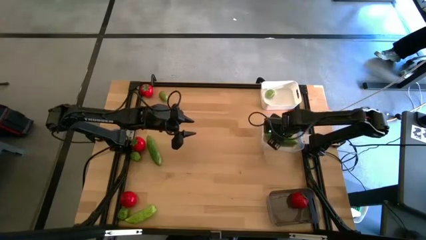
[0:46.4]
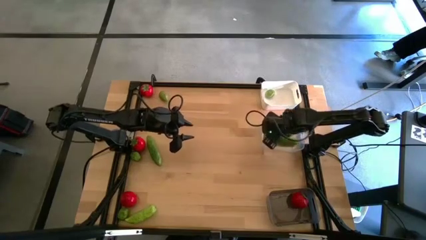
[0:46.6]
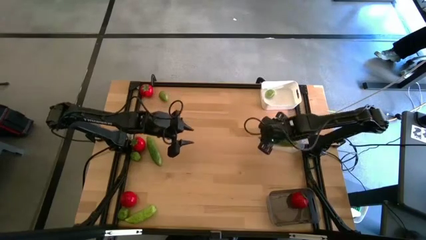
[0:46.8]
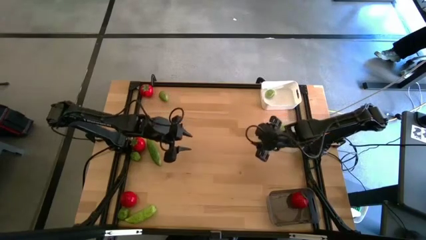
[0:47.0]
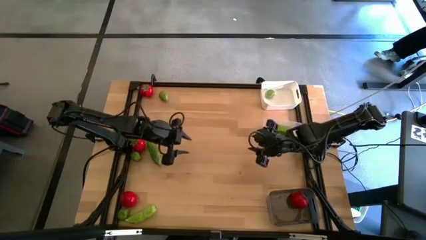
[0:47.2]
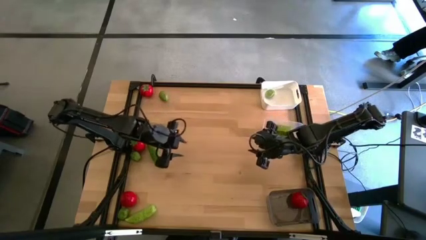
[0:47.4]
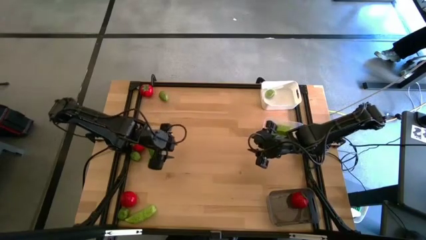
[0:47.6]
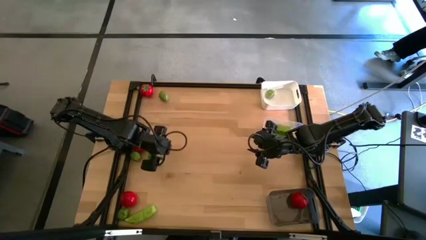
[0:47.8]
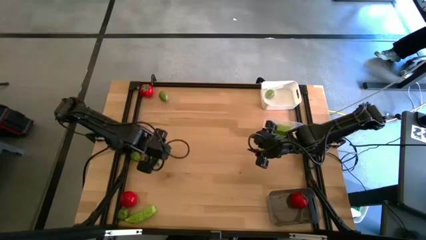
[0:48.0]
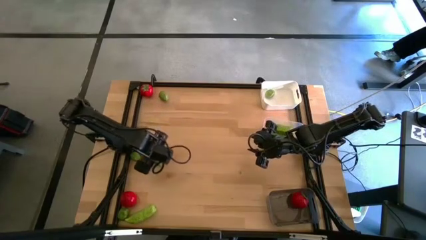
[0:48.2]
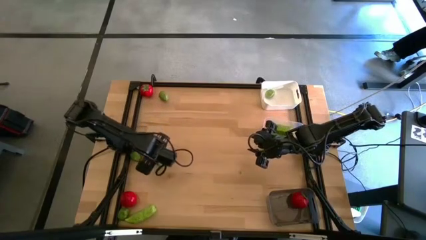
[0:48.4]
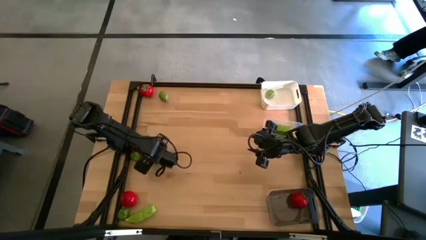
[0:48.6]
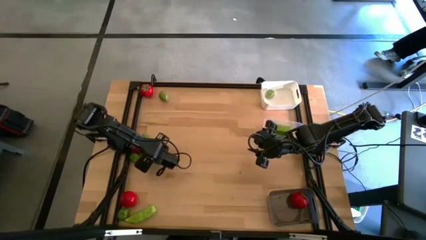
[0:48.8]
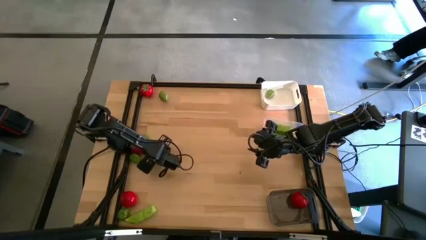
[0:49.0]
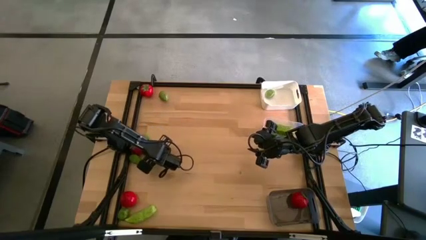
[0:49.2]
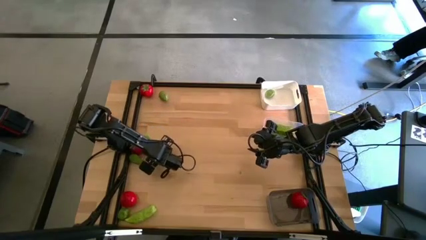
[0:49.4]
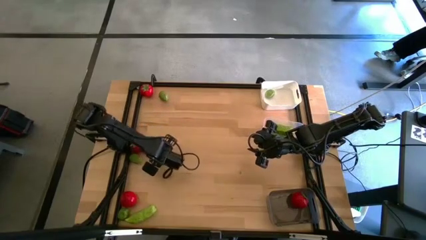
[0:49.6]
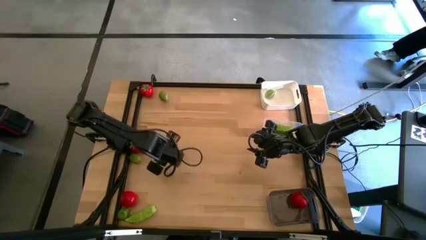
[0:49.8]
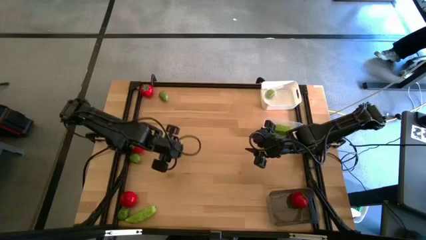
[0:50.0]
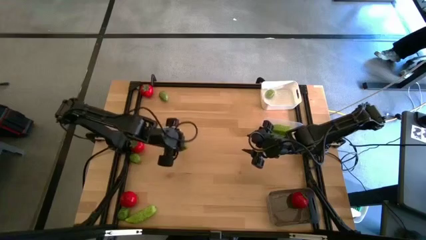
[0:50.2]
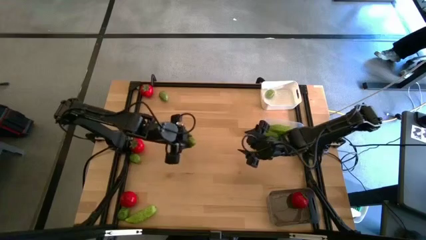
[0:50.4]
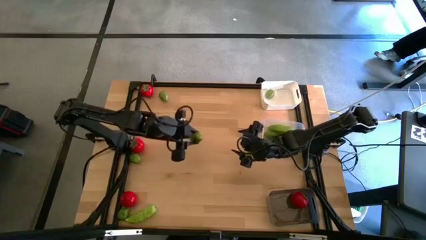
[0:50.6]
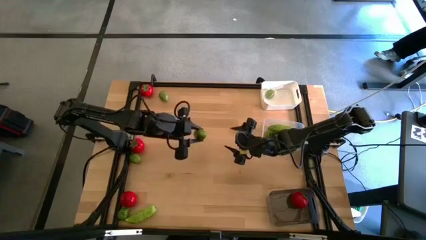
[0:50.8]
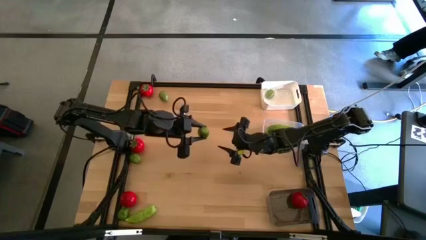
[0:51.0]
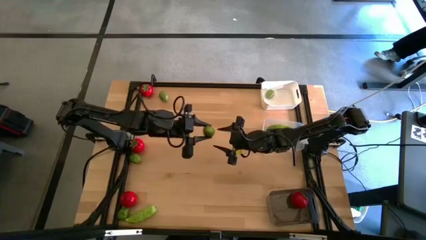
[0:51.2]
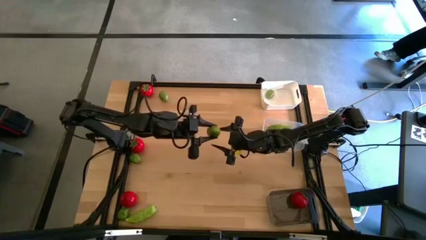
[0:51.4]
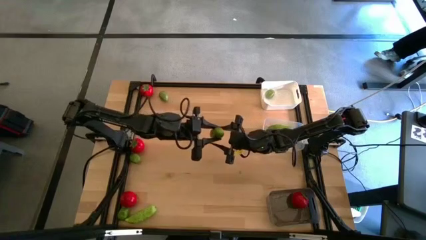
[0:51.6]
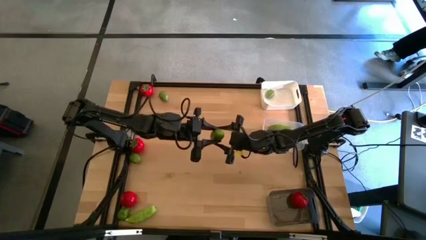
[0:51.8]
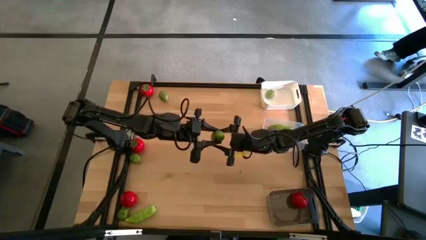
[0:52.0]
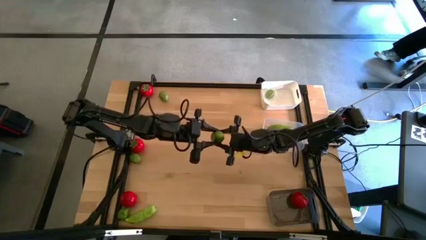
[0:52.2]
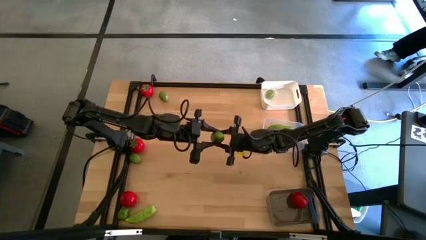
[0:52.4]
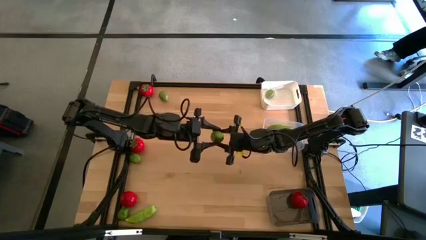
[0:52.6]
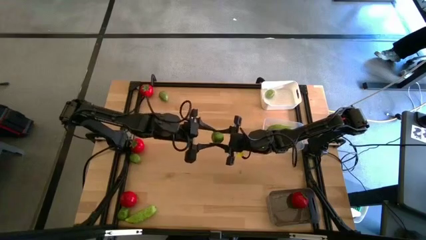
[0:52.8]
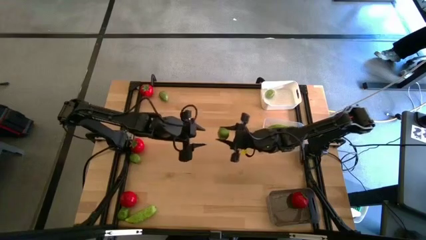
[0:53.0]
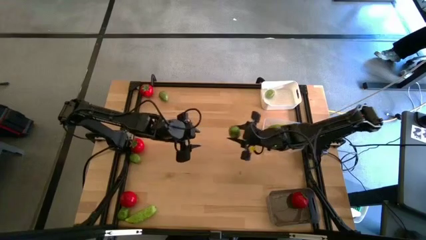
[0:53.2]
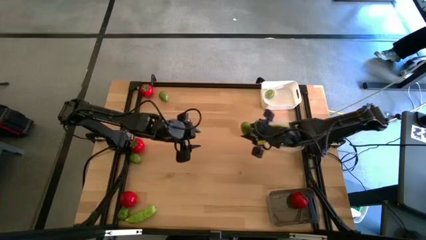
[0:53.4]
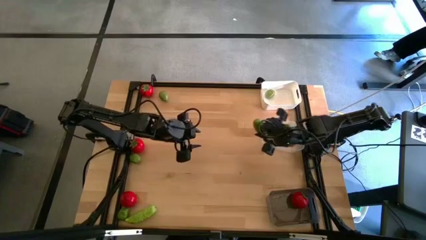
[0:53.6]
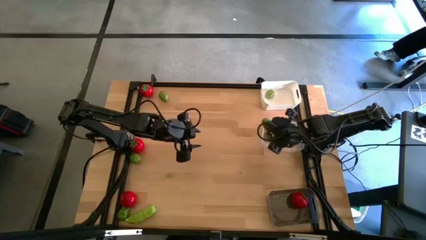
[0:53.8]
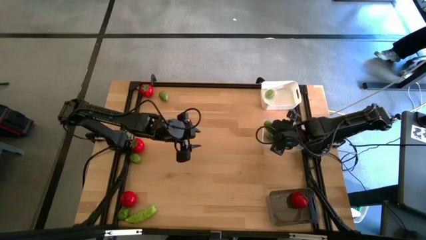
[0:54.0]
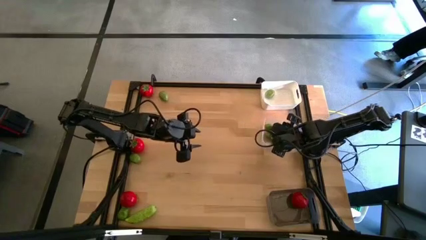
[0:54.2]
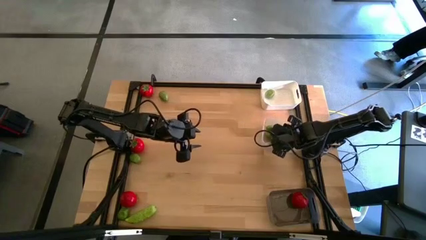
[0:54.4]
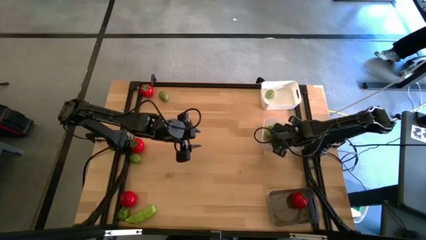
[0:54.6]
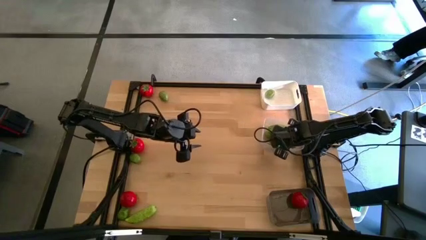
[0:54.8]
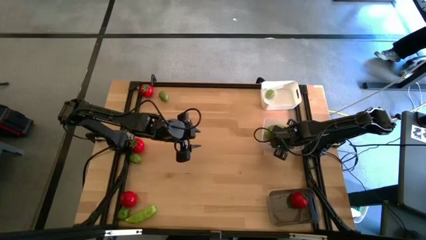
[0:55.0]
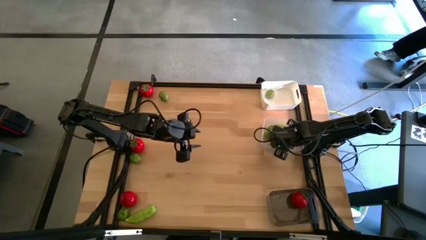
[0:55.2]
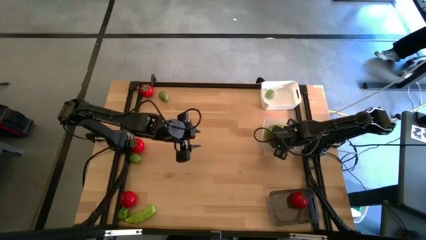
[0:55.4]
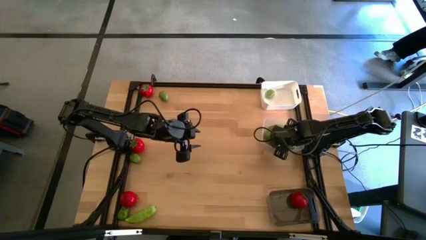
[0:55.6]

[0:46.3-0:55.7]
Task: Sort produce into baskets
Put the bottom cucumber into the transparent bin

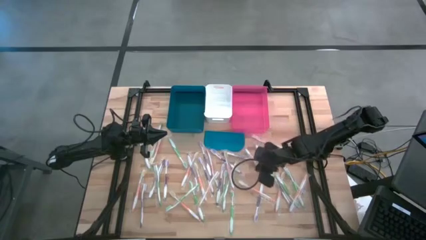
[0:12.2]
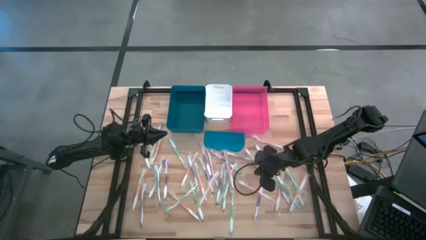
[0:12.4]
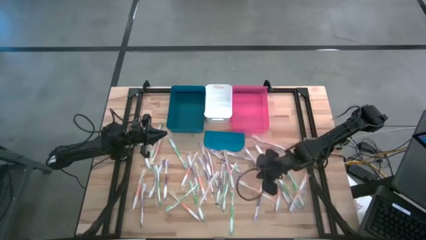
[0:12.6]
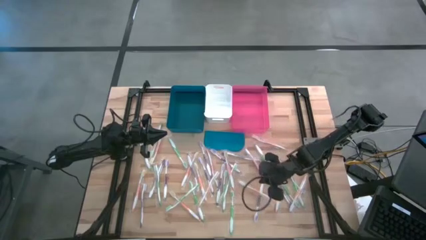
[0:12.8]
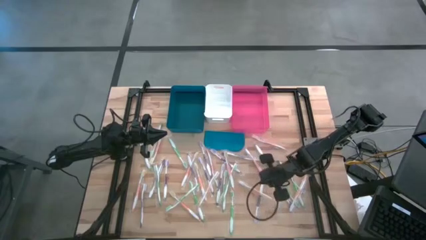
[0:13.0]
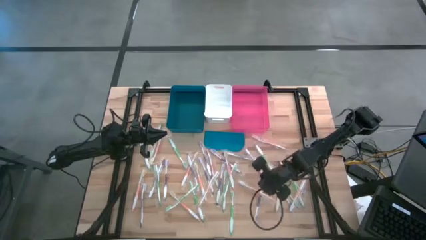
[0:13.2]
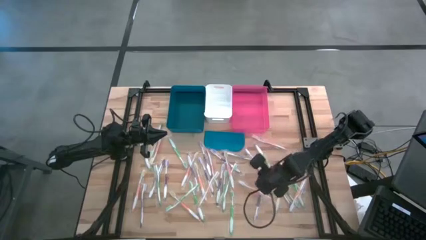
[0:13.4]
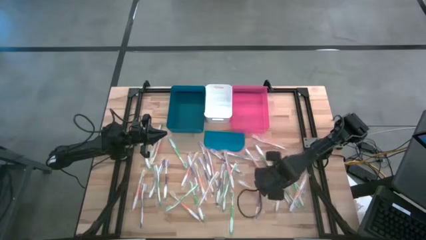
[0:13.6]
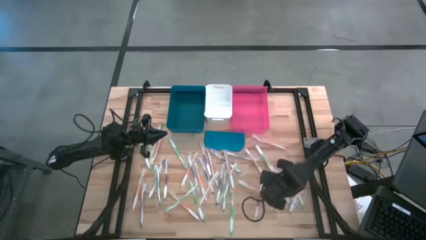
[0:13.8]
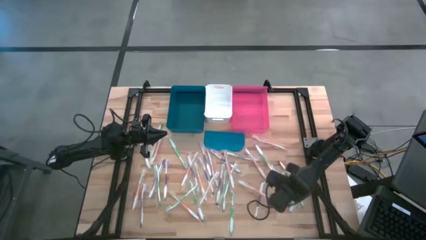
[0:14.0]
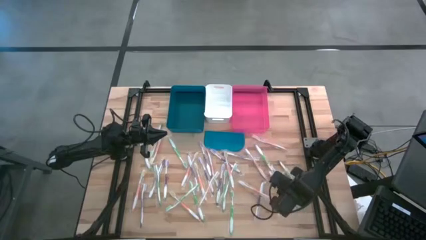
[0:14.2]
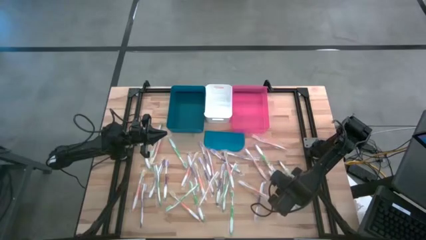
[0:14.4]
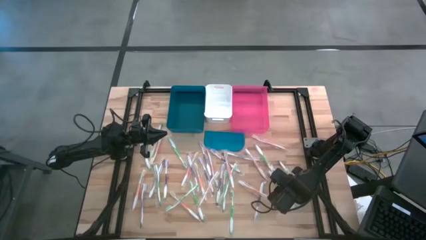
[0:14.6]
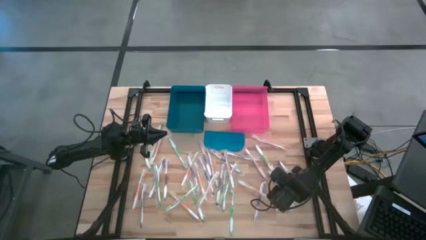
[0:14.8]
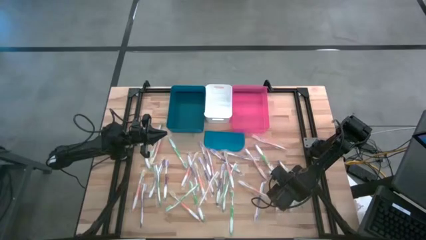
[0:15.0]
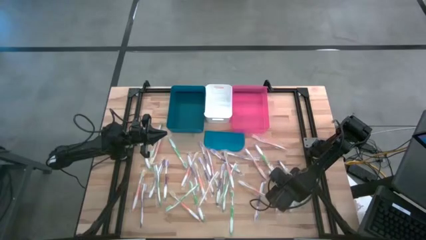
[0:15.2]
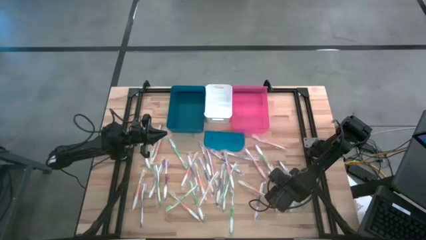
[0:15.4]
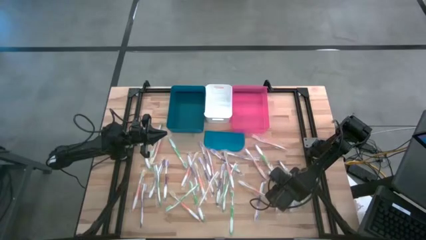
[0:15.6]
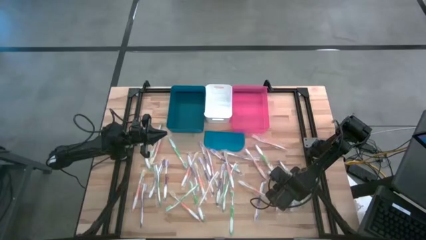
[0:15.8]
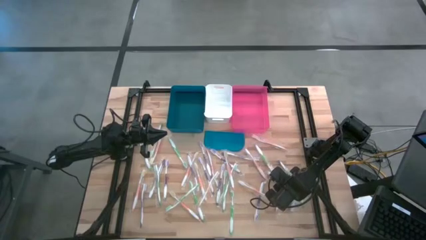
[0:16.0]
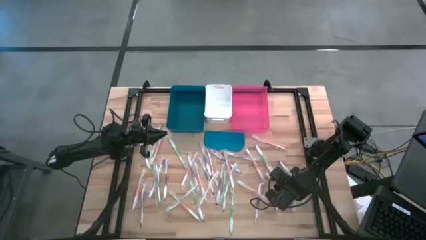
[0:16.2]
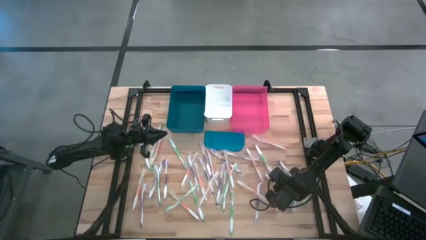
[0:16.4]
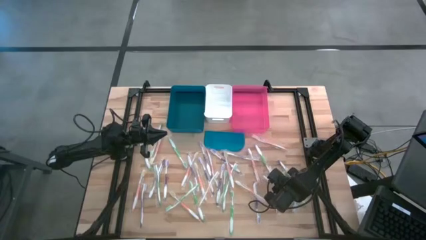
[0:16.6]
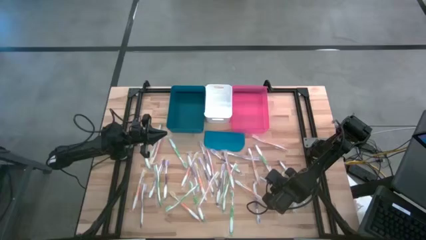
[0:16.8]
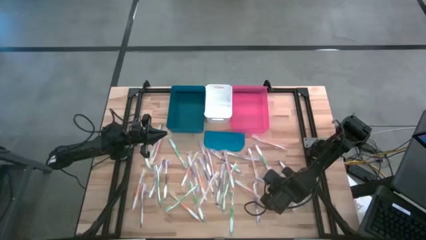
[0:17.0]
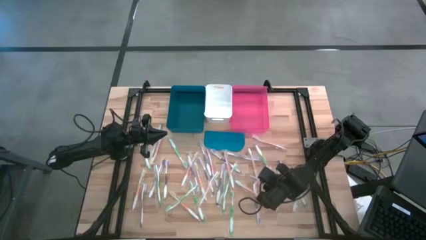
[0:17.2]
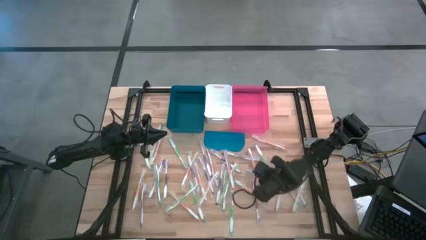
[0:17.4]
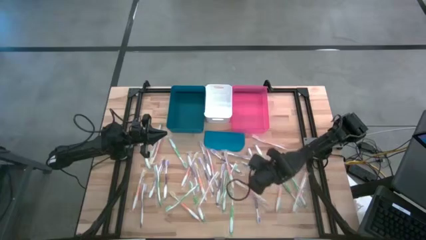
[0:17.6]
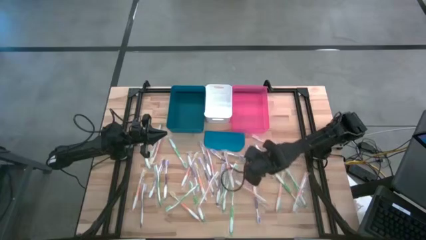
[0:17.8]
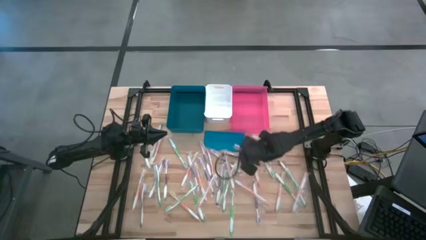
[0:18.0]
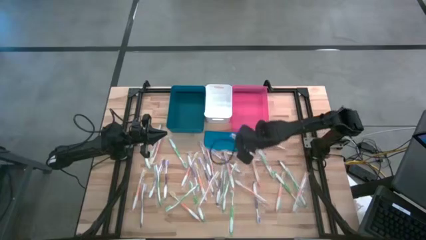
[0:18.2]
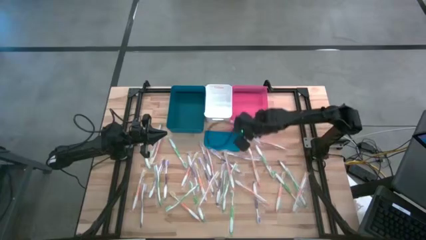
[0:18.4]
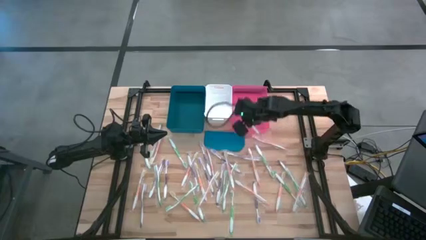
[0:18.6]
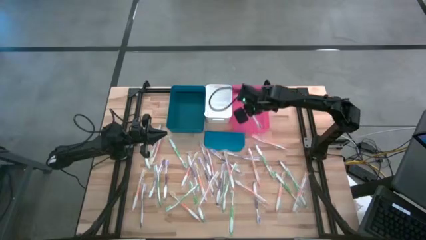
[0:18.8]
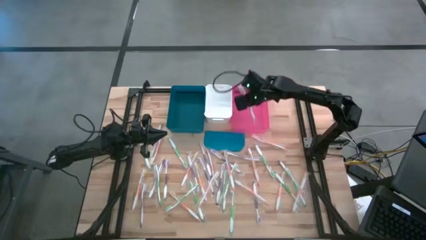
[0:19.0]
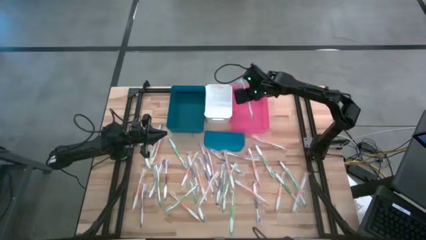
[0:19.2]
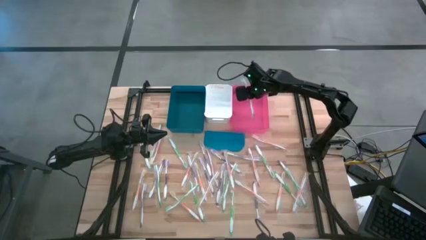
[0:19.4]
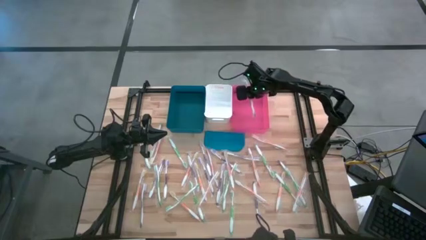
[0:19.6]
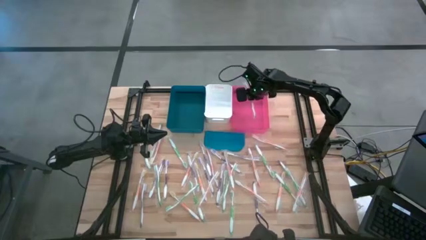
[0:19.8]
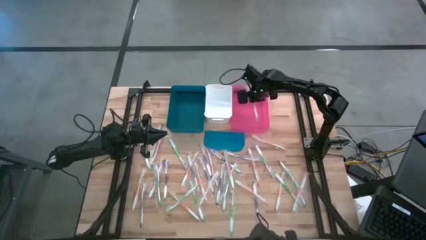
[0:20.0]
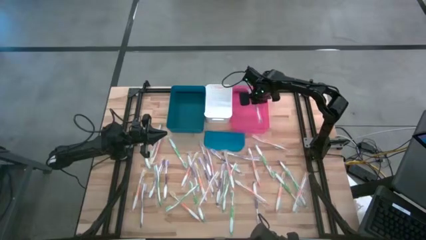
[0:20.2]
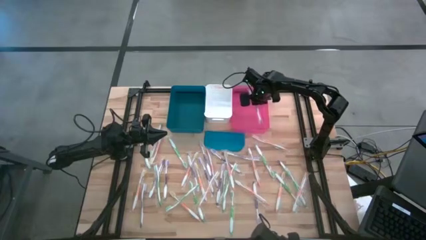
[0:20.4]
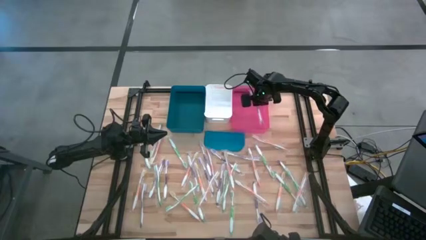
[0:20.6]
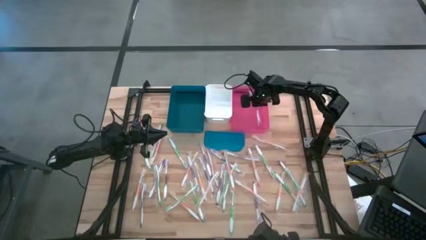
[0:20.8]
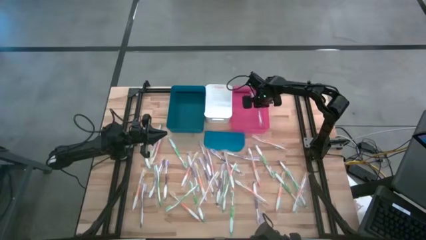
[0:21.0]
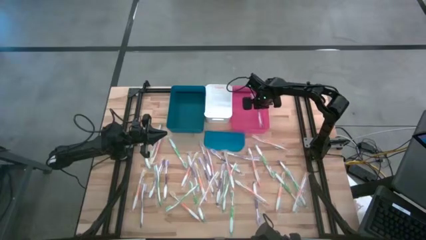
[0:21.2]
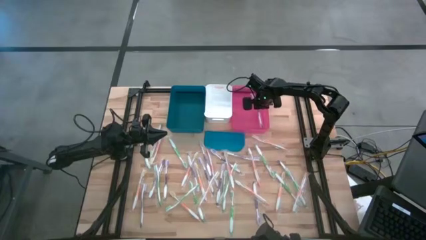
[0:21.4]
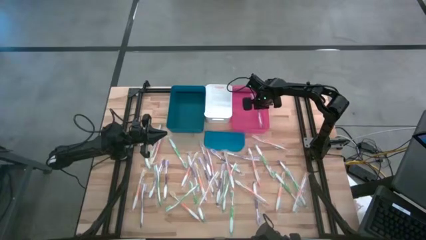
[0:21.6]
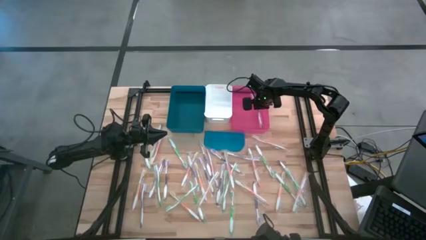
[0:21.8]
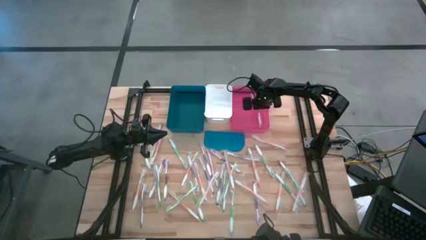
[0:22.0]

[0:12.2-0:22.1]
Task: Pick & Place Toothbrushes
Put the purple toothbrush into the pink bin
